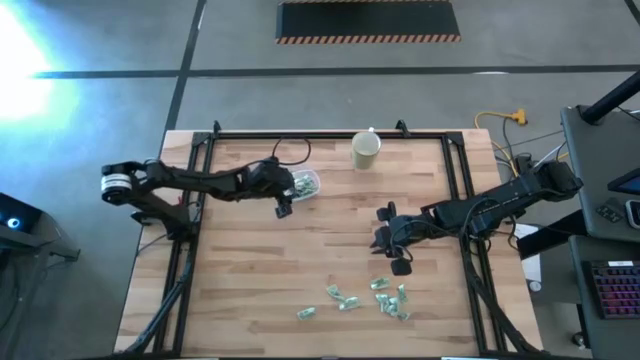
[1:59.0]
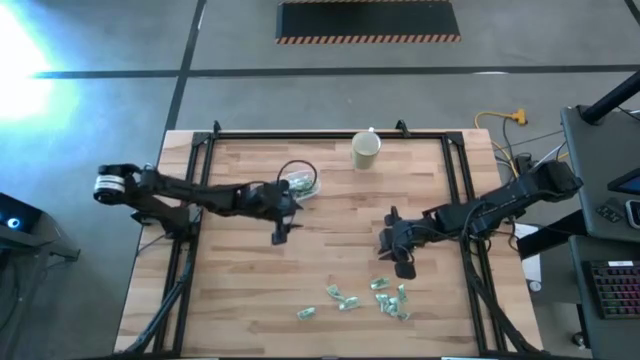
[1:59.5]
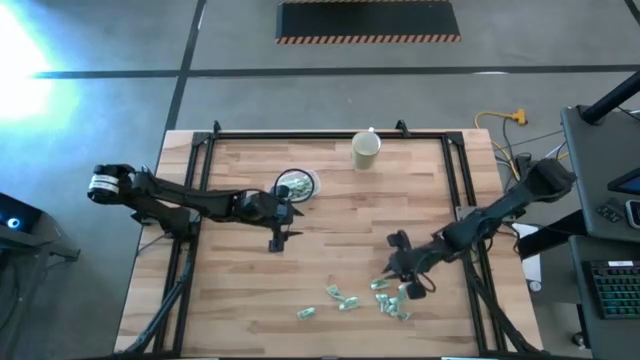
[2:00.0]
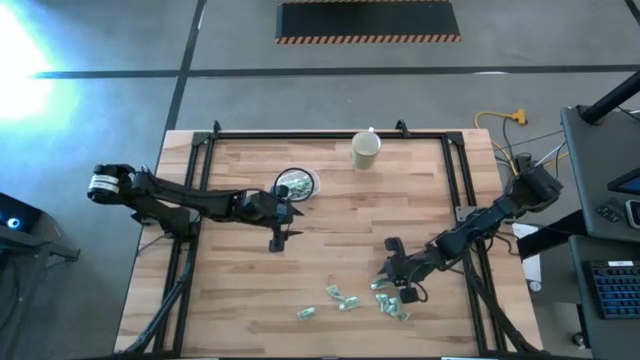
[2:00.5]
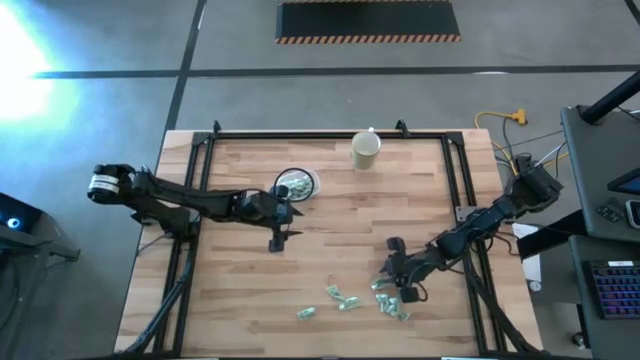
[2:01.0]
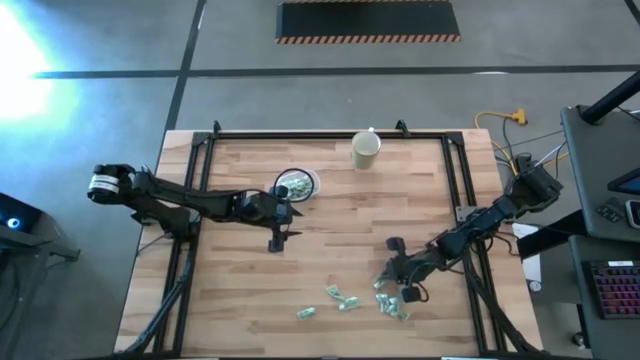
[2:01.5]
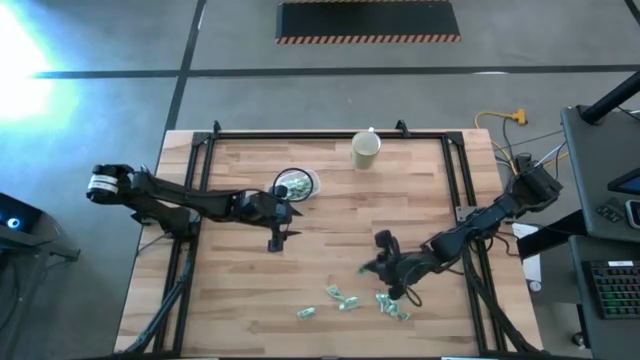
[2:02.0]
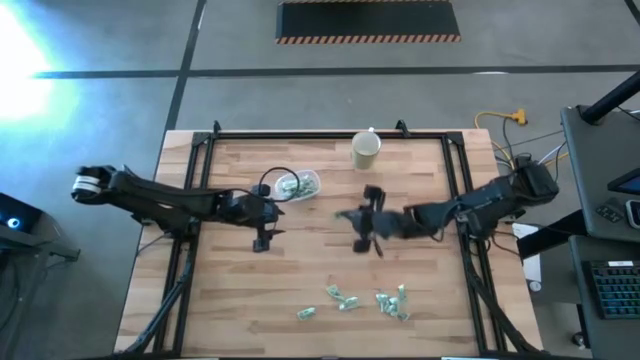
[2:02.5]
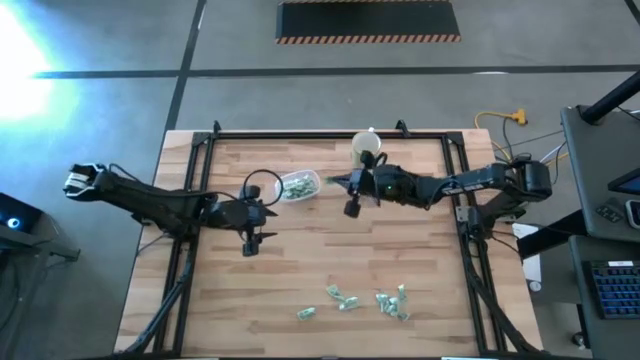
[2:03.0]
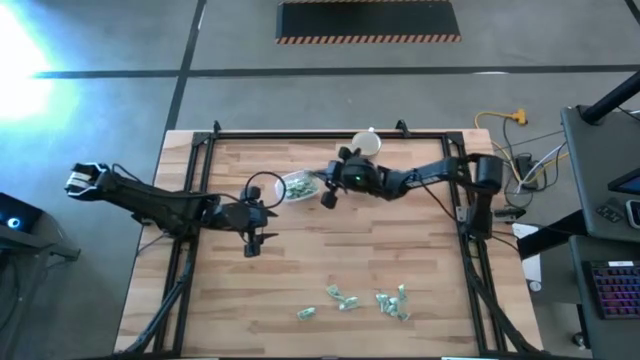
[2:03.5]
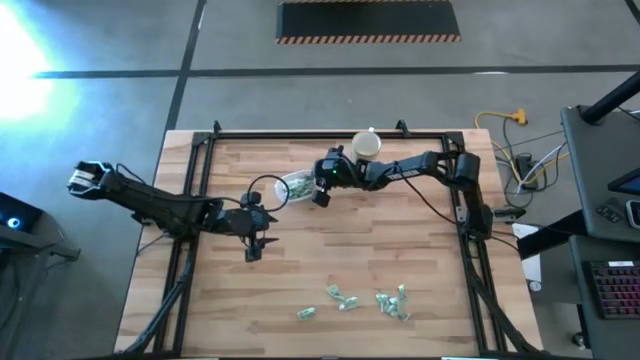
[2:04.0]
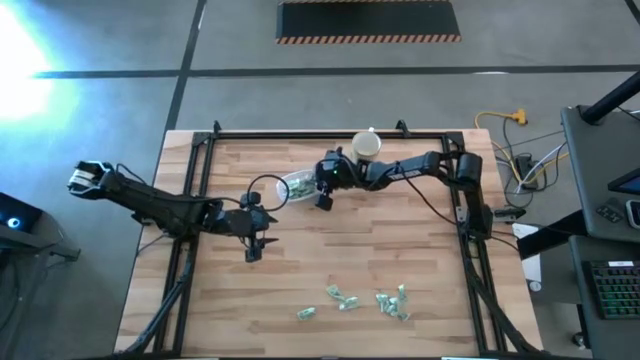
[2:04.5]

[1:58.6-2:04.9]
Task: Pick and place Stevia / Truvia into bins
Put the stevia packet into the transparent container

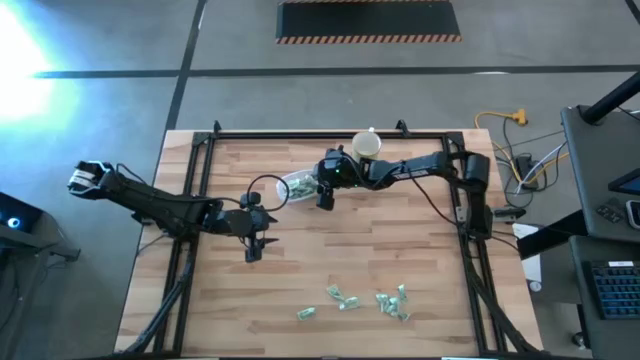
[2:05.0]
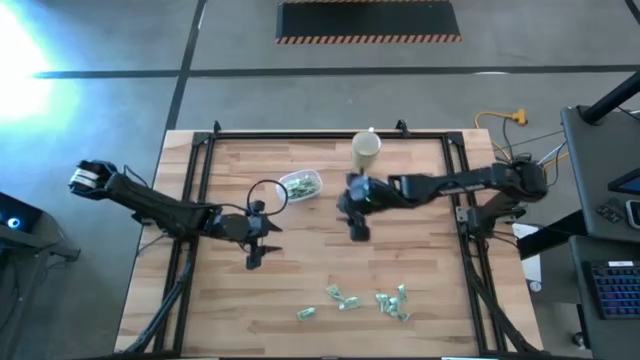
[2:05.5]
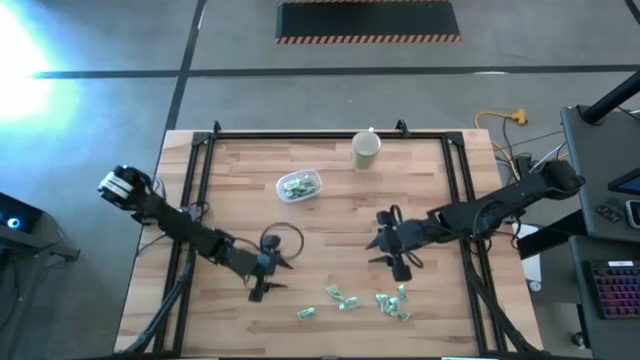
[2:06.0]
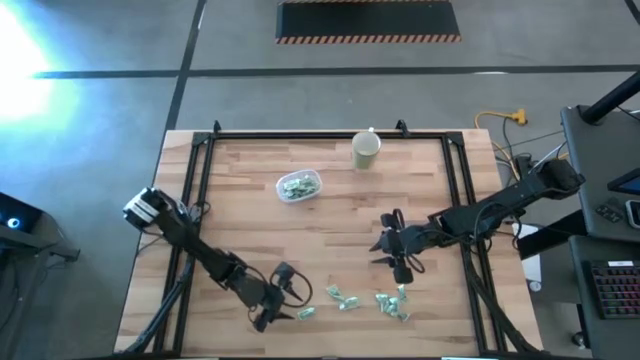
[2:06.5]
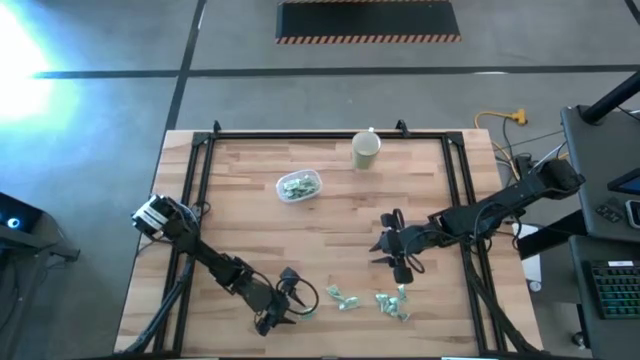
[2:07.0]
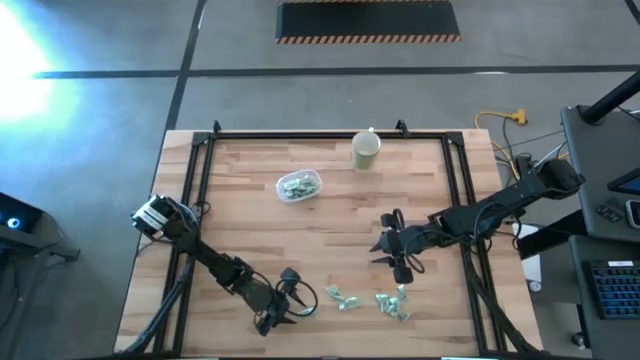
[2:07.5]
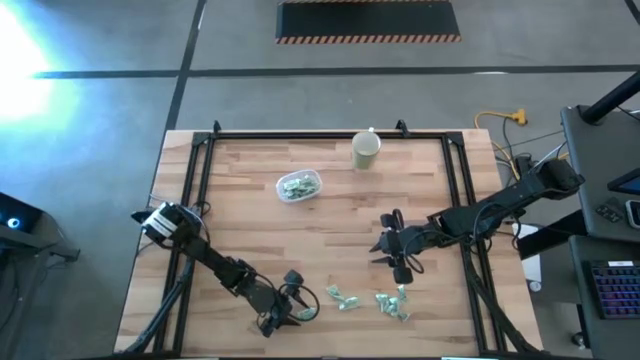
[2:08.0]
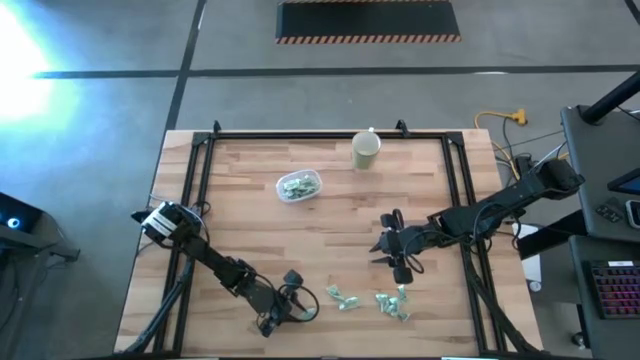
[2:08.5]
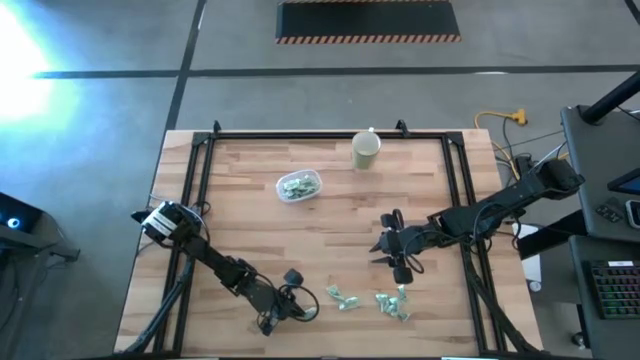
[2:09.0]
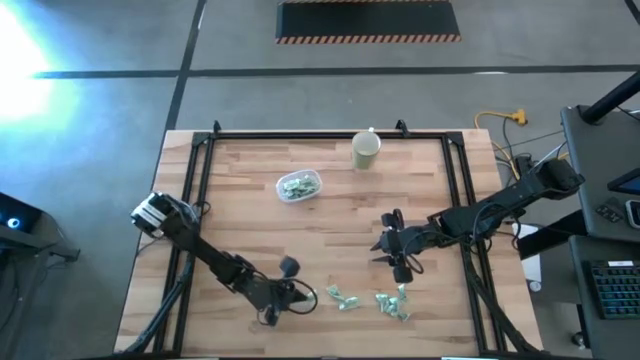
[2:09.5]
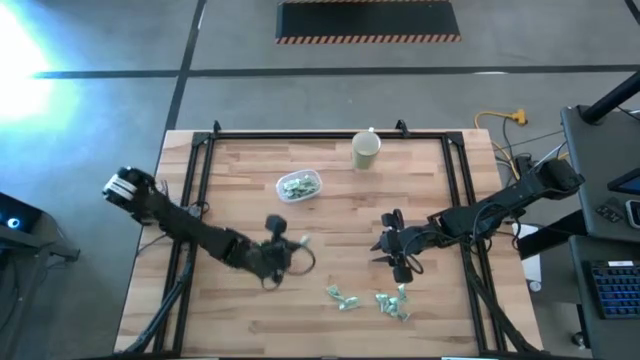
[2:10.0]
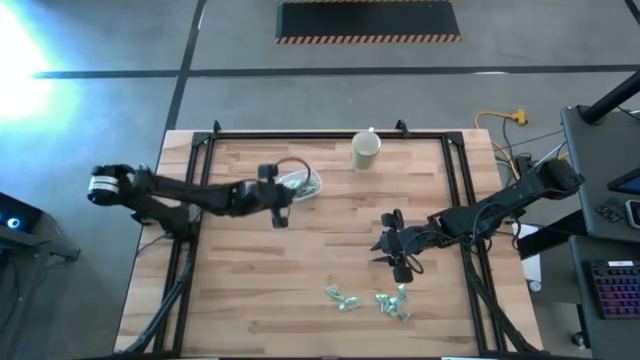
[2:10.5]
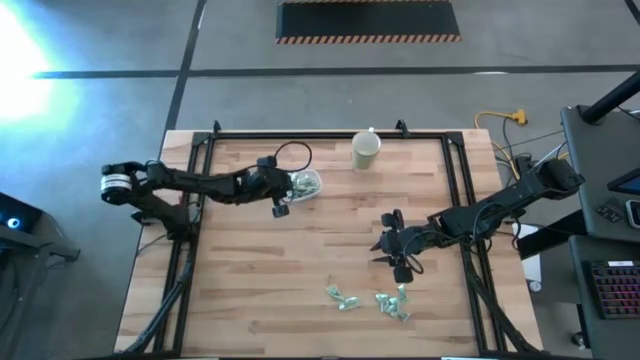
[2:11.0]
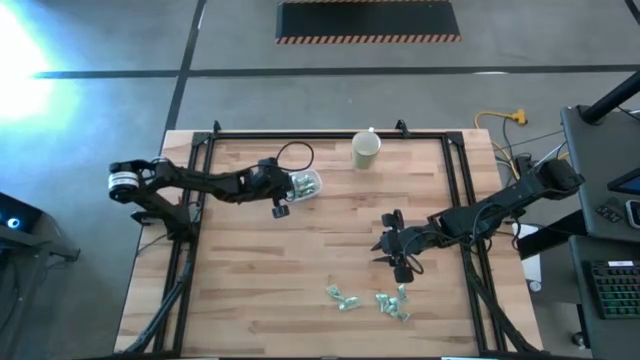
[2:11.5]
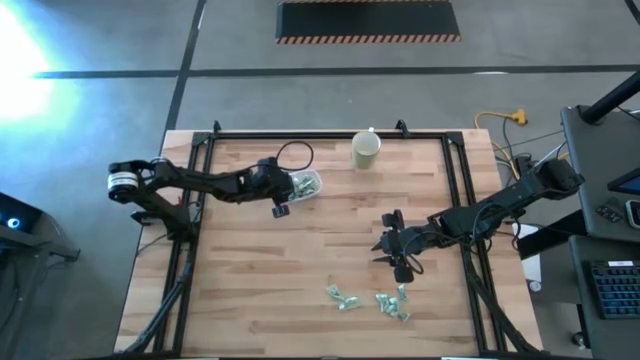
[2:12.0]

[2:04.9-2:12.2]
Put the stevia packet into the transparent container

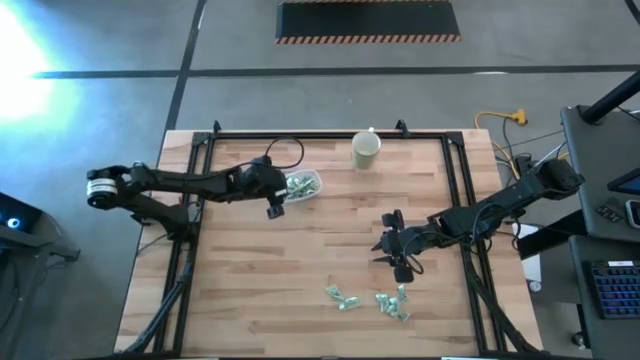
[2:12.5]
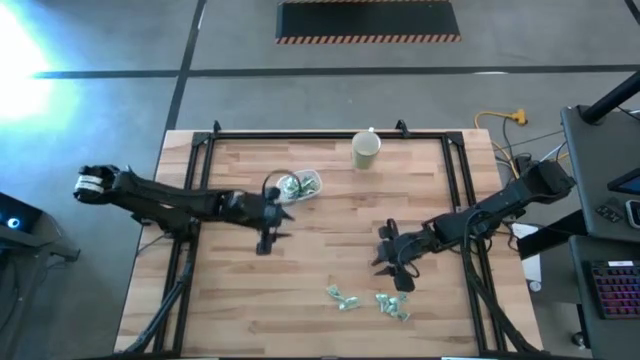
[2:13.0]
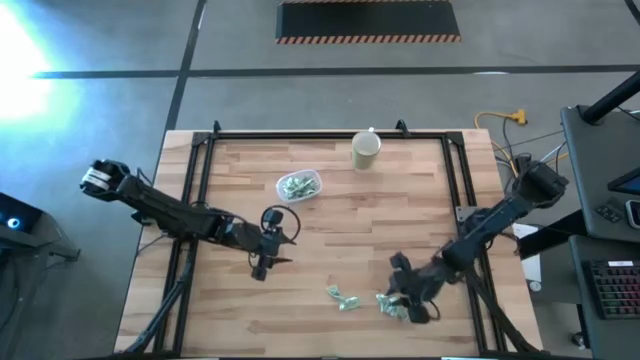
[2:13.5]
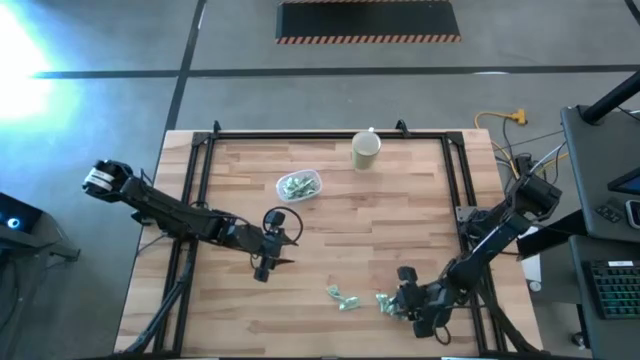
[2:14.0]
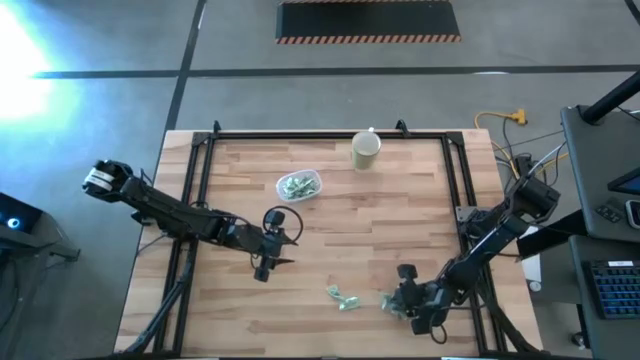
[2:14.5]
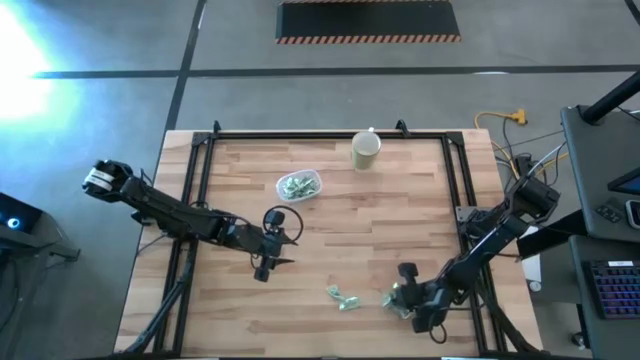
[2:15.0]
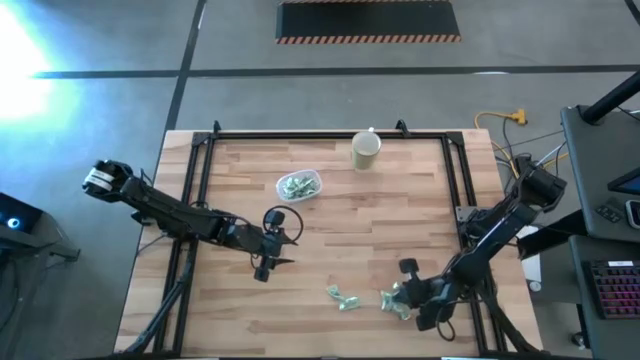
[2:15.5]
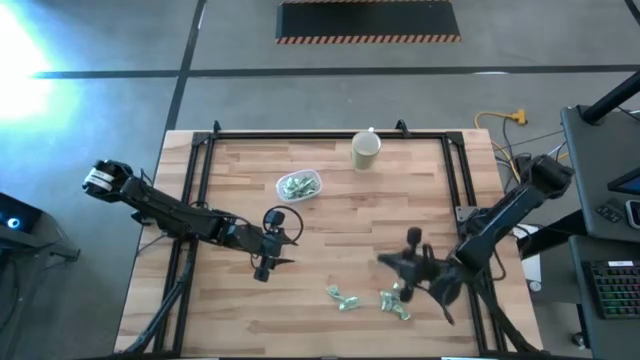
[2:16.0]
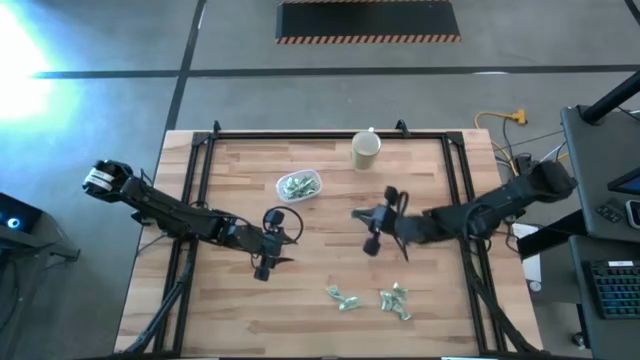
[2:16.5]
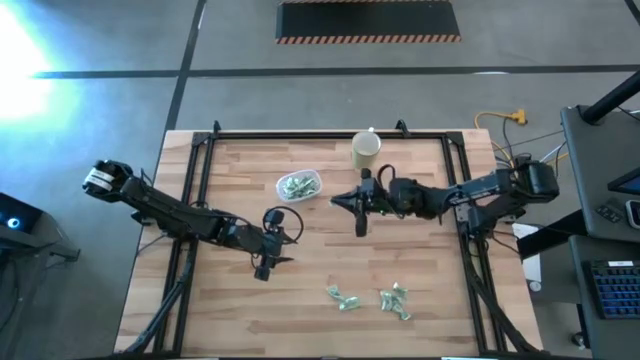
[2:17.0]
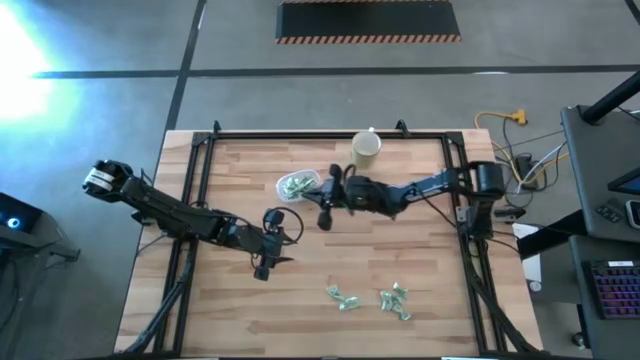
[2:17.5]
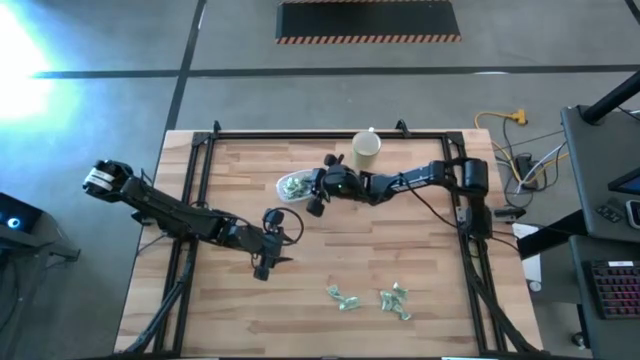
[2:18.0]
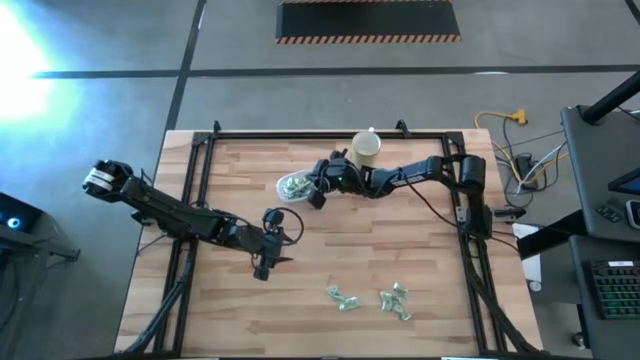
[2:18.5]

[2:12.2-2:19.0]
Put the stevia packet into the transparent container

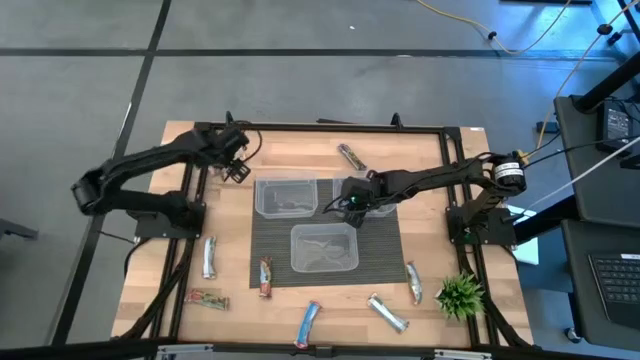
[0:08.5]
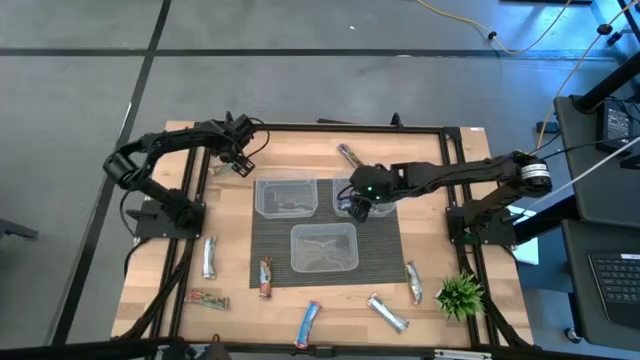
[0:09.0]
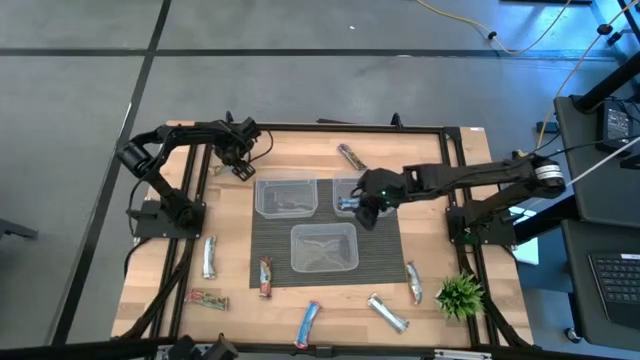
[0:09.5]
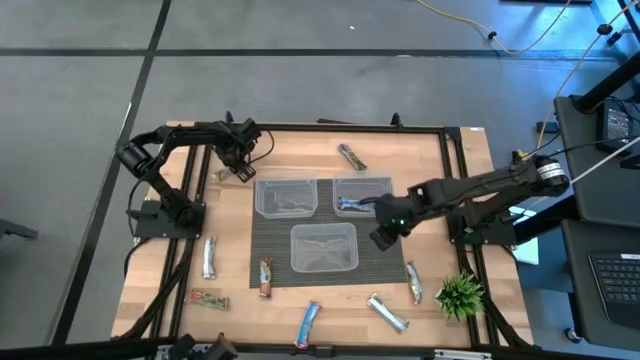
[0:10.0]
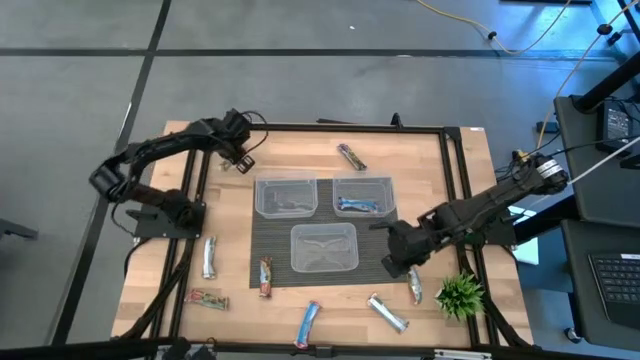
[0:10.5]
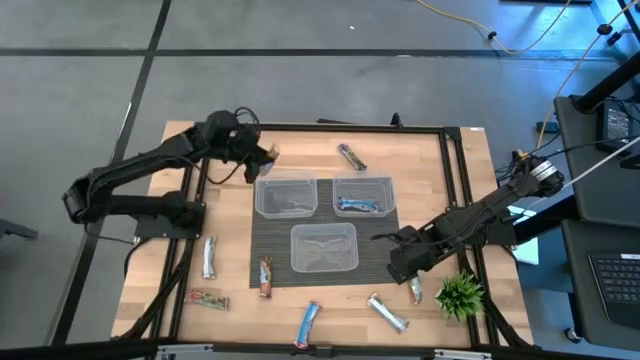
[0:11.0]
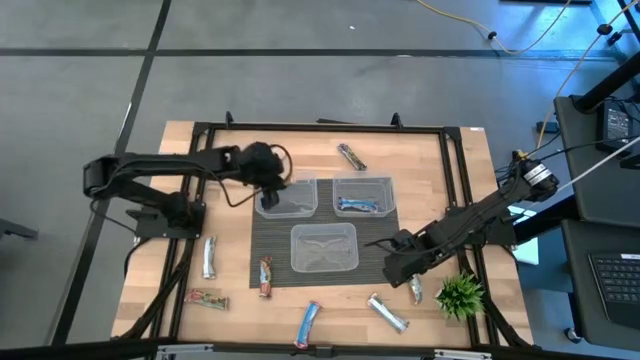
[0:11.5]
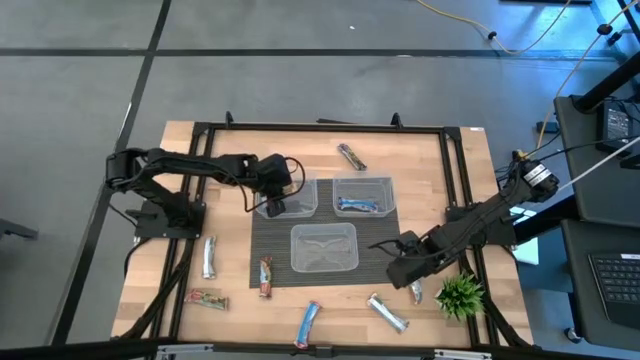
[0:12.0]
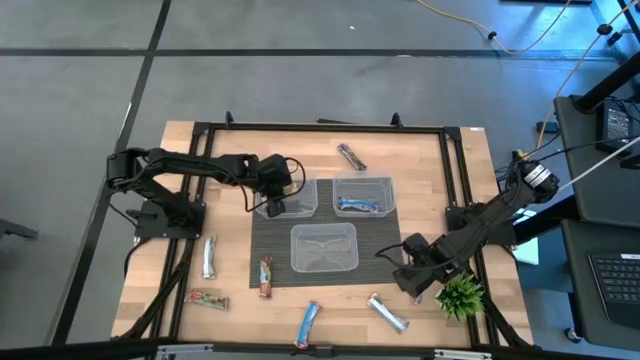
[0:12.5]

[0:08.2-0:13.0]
Task: Pick and place Granola Bars by type
Put the yellow granola bar into the top left transparent bin
